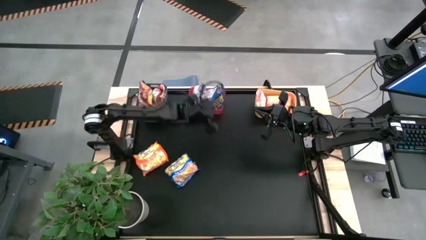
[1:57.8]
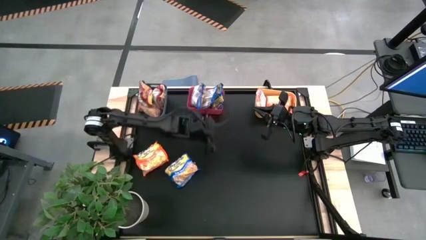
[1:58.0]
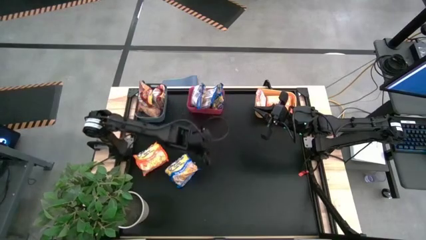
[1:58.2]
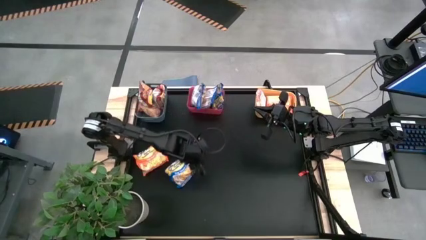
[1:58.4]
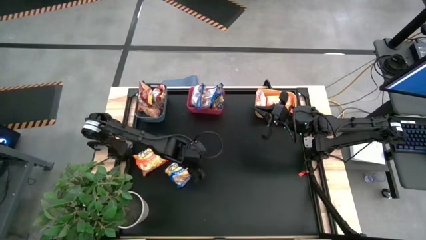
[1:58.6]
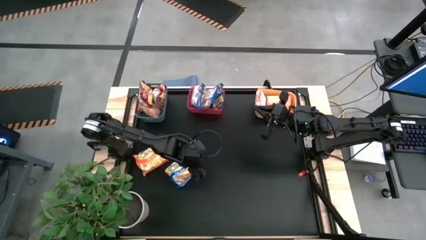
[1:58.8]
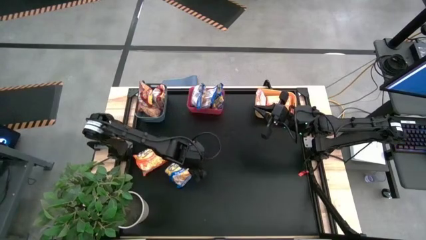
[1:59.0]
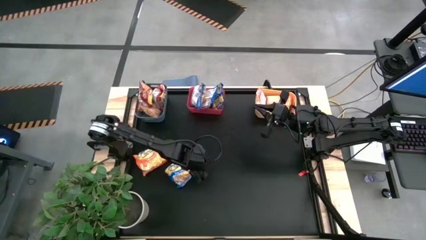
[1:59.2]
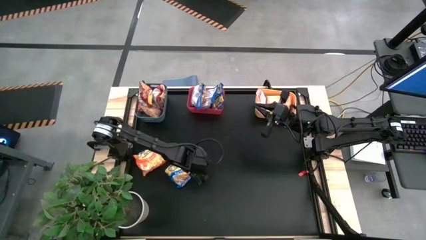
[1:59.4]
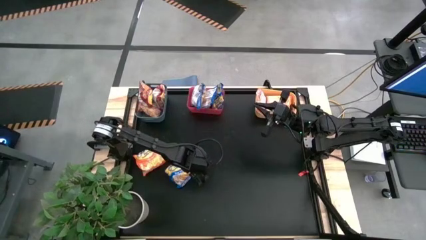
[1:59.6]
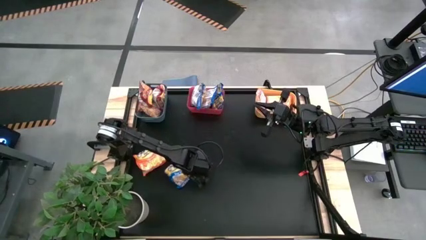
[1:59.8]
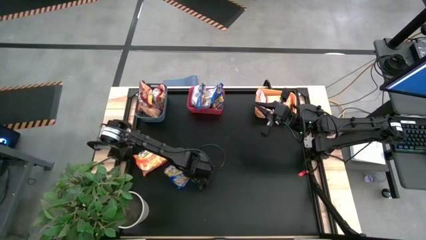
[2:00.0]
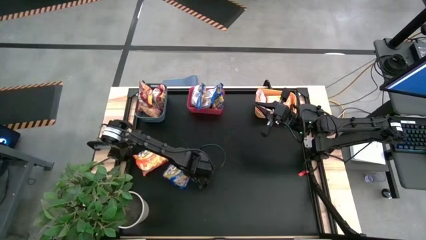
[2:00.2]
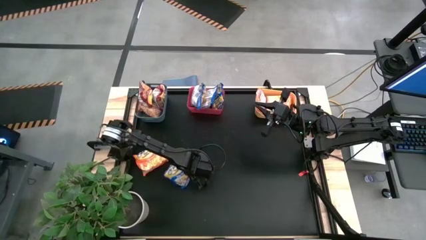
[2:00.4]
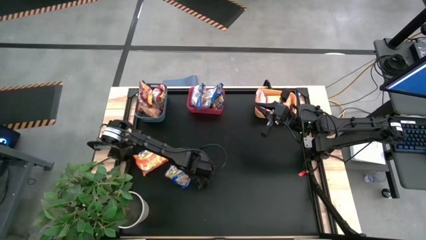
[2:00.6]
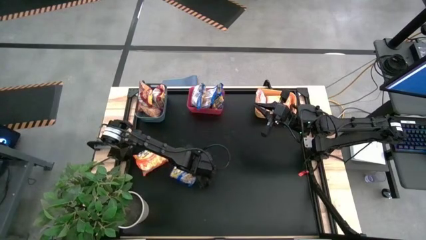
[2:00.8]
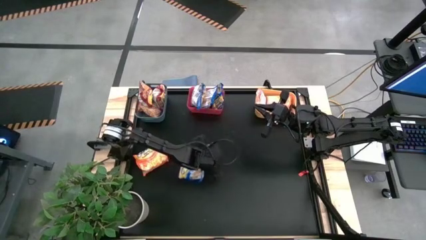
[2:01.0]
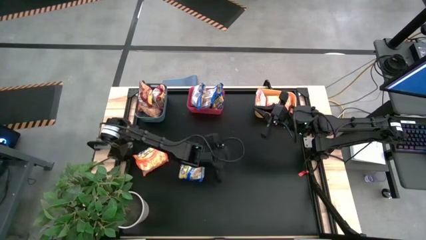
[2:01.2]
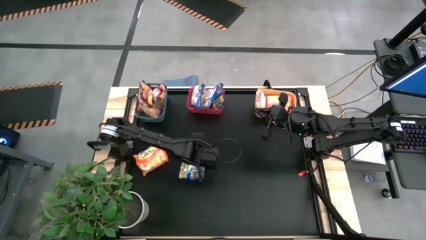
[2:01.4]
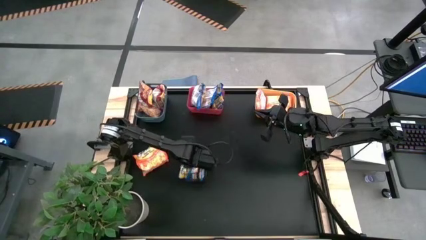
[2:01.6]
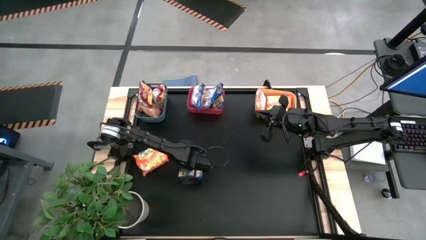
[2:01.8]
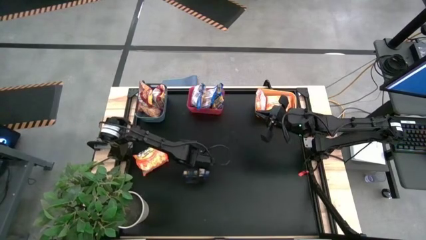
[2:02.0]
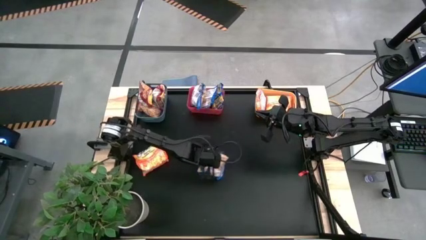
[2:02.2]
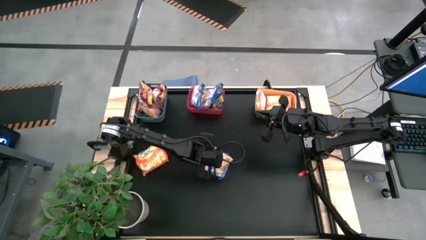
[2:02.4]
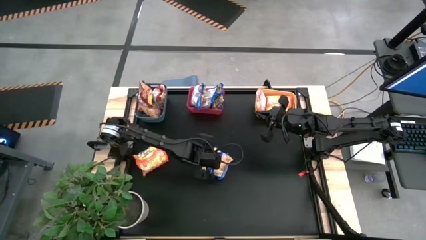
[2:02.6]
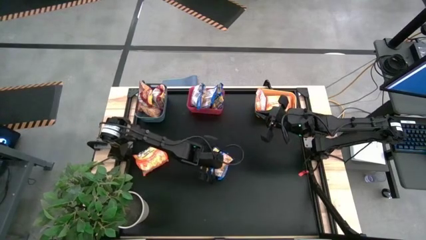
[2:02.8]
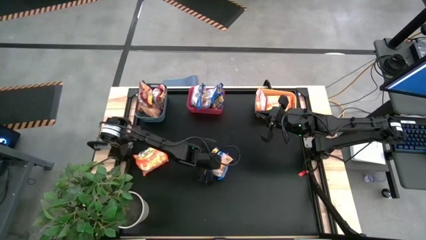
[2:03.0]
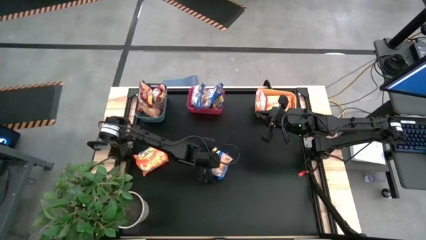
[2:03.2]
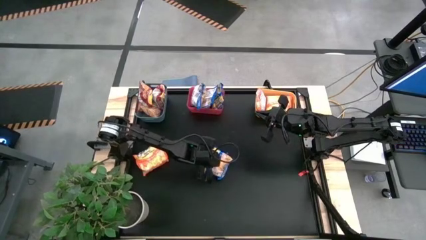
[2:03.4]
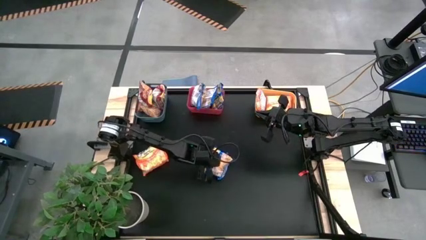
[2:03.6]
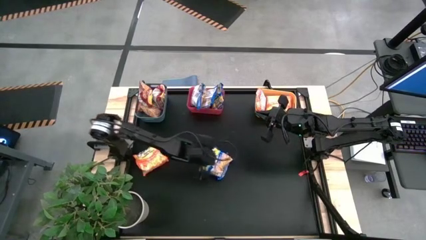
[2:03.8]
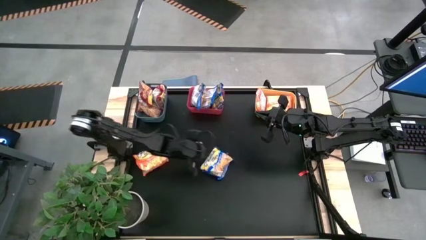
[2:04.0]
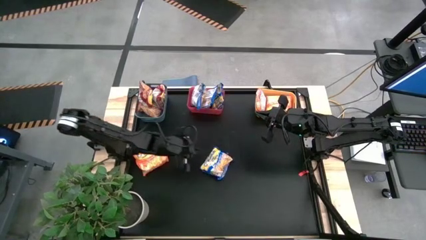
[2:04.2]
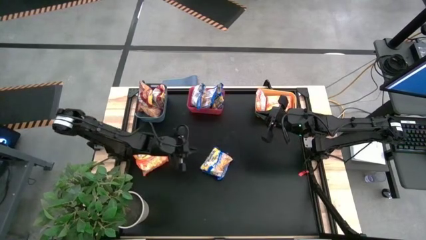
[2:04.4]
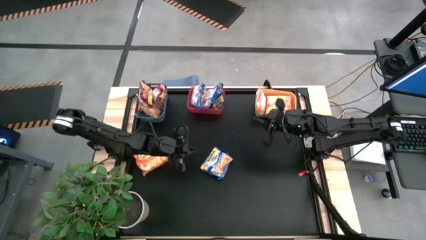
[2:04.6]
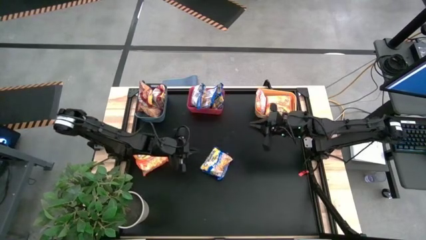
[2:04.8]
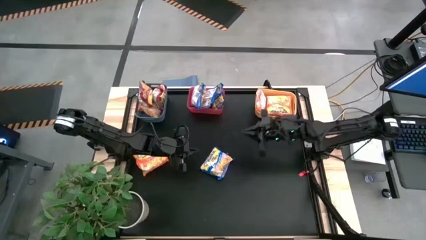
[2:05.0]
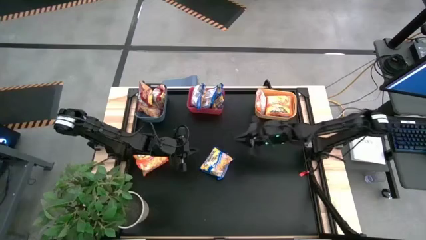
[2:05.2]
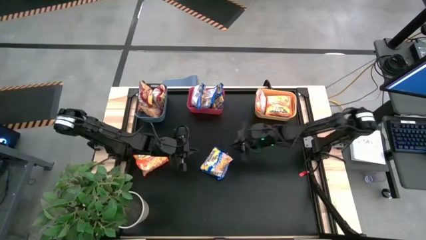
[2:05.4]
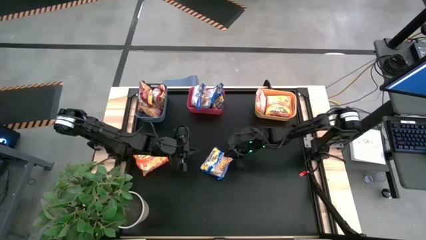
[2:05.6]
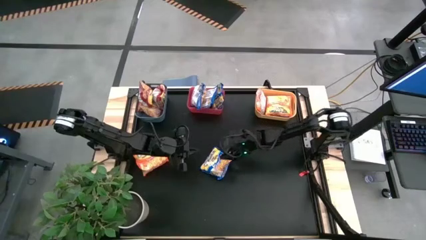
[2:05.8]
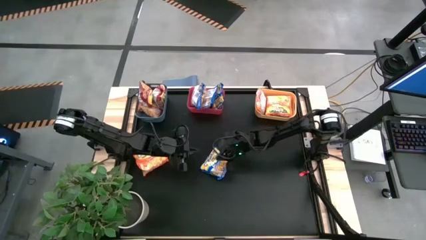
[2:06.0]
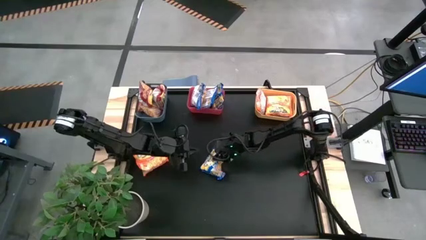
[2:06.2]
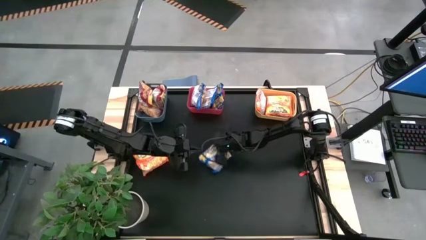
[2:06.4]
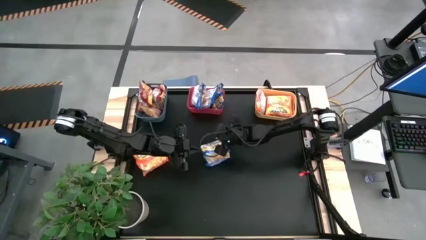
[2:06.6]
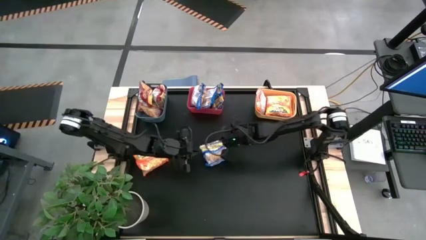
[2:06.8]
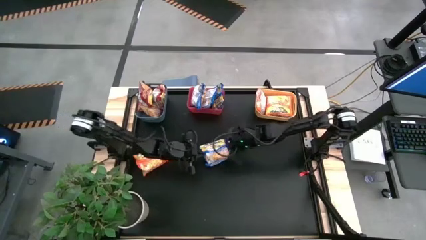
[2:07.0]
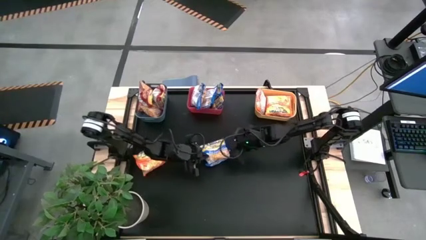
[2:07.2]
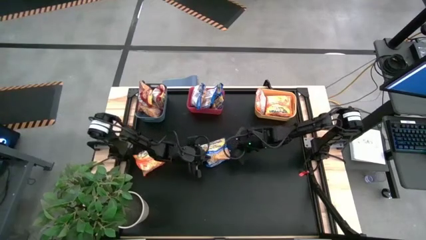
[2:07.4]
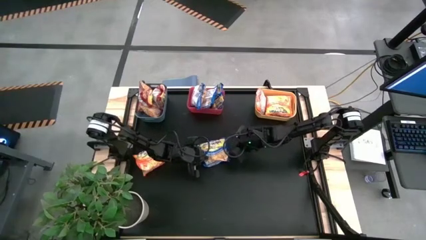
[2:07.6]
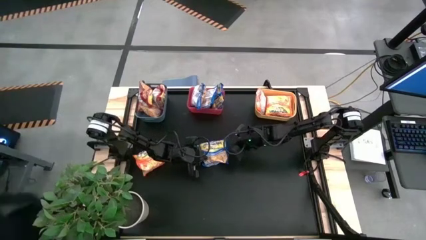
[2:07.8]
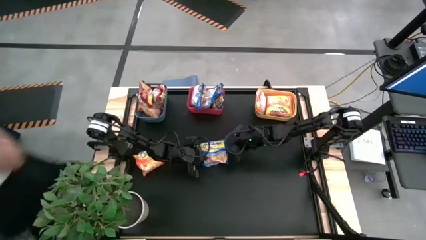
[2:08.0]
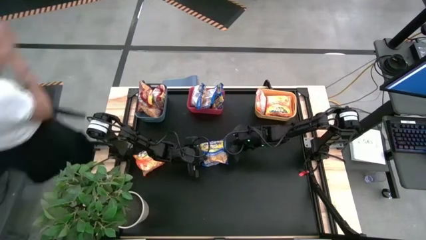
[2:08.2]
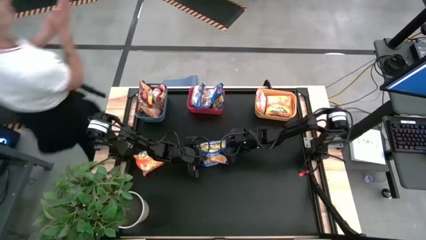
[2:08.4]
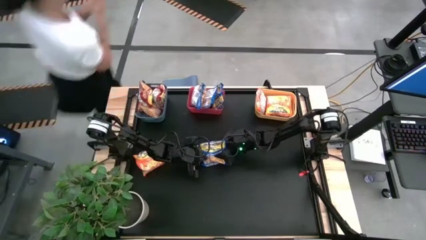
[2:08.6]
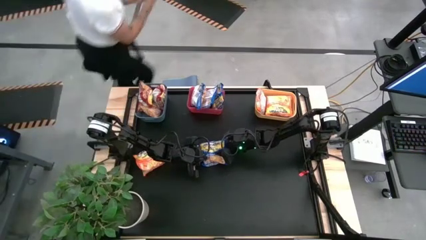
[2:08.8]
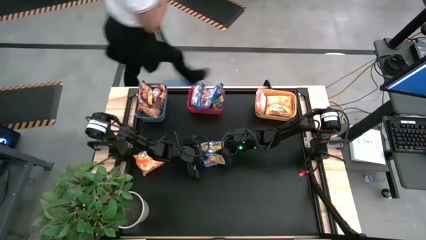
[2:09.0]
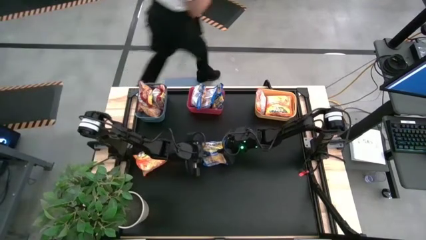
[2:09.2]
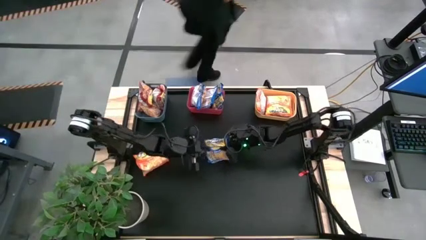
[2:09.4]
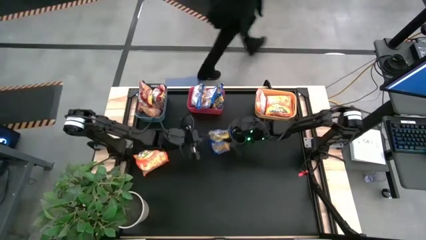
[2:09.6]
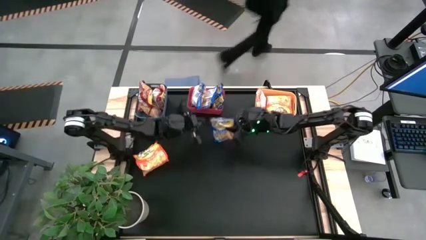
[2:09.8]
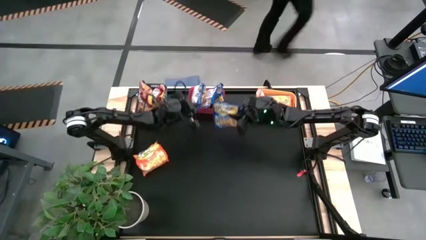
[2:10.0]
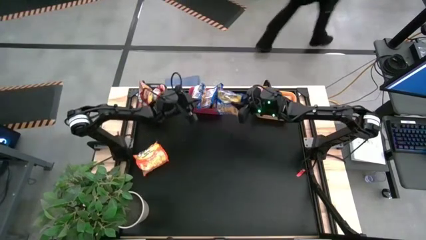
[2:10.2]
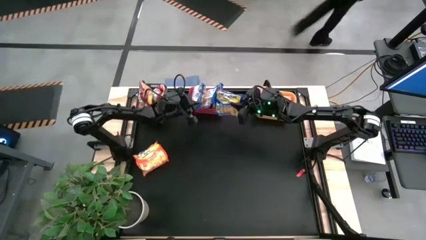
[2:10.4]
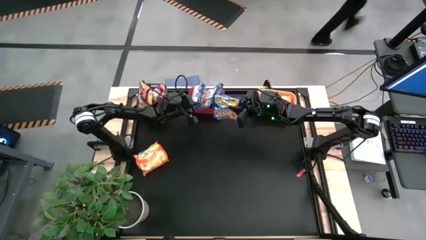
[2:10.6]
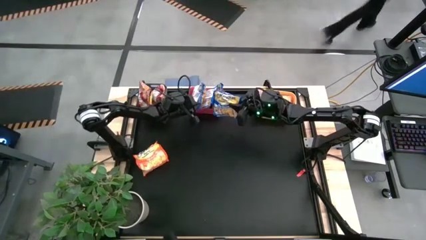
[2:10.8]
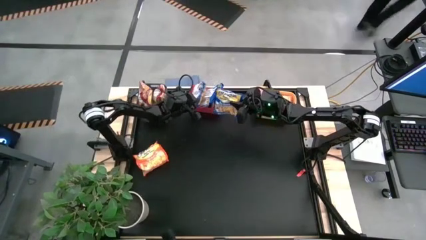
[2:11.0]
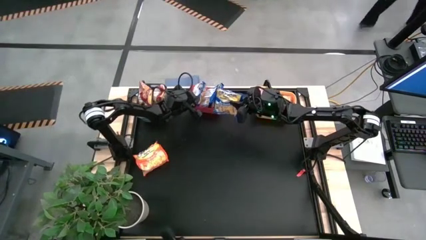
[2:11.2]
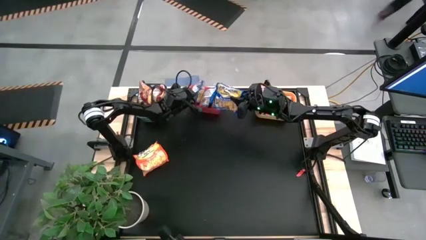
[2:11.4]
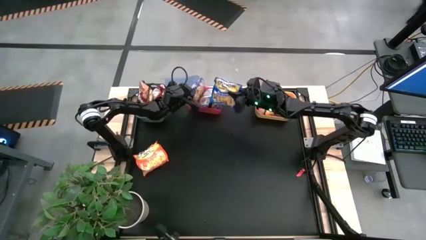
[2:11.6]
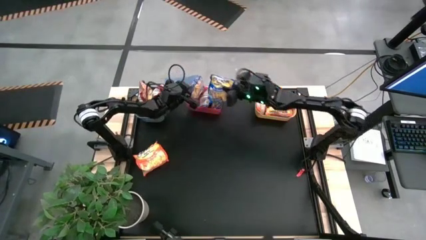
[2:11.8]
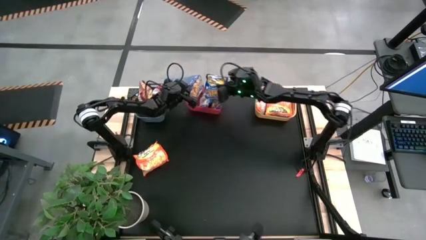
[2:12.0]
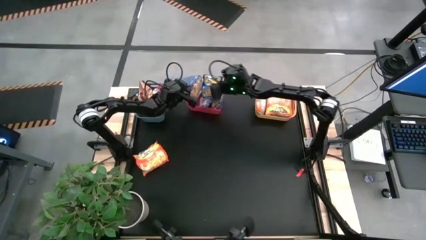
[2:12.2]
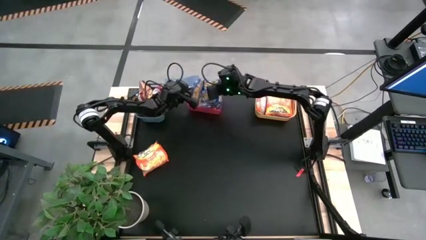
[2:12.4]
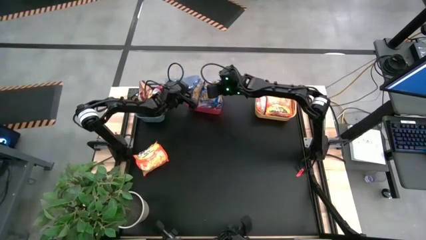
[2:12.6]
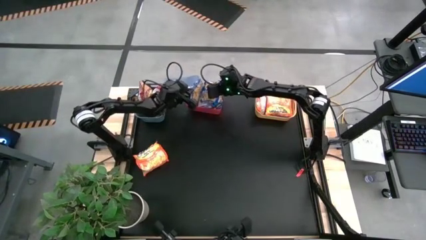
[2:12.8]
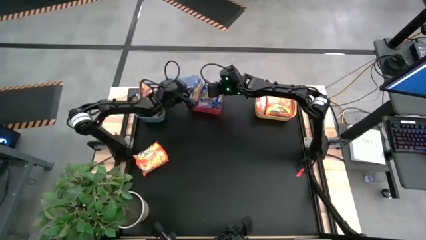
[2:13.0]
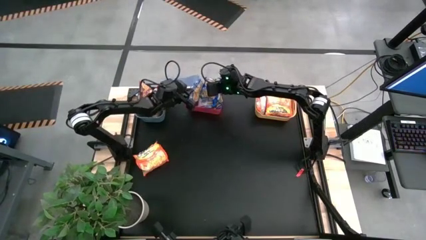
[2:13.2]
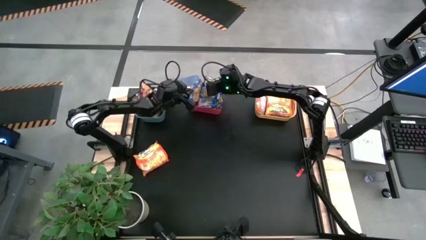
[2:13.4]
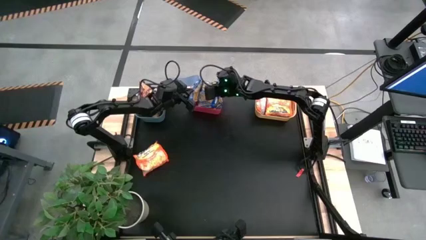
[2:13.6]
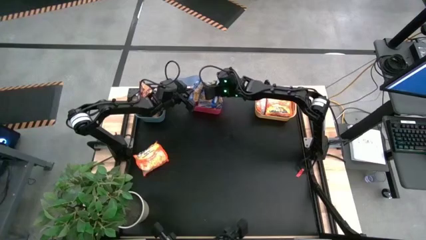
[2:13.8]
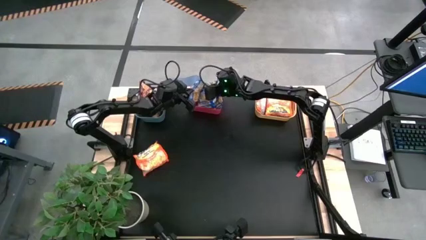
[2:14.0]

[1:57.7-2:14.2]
Task: Sort Maruchan noodles
Put the blue noodle pack into the pink bin
